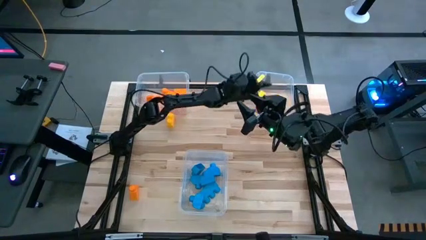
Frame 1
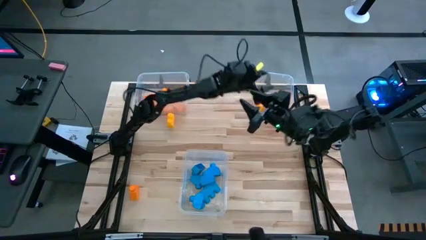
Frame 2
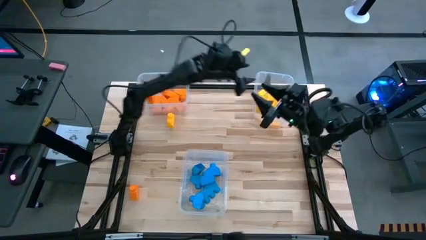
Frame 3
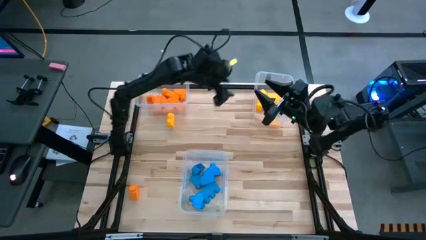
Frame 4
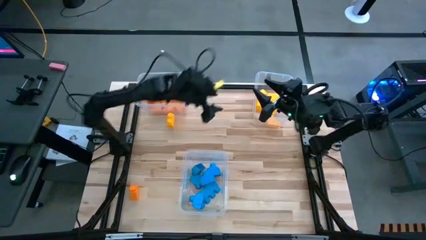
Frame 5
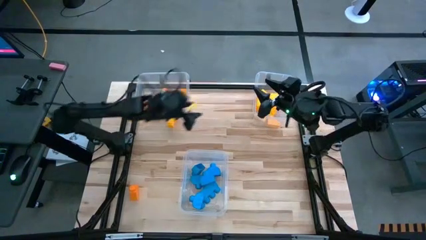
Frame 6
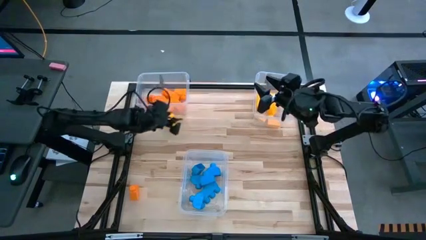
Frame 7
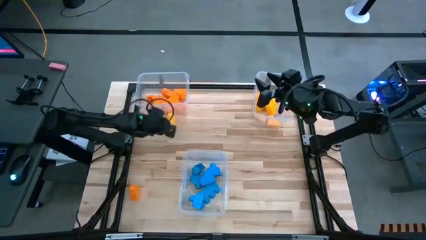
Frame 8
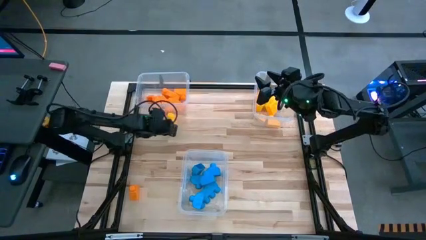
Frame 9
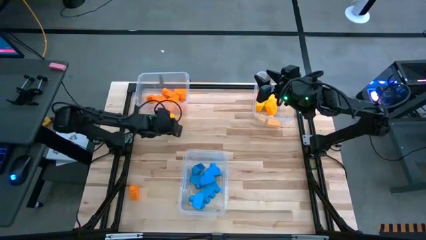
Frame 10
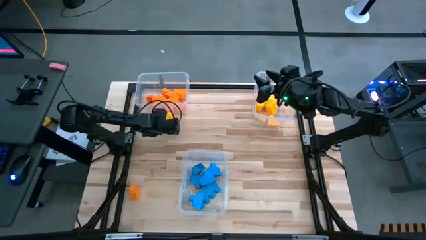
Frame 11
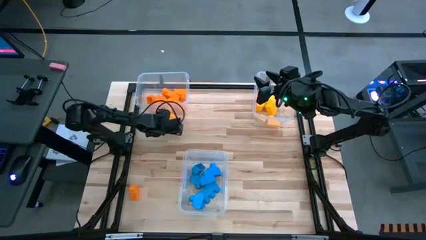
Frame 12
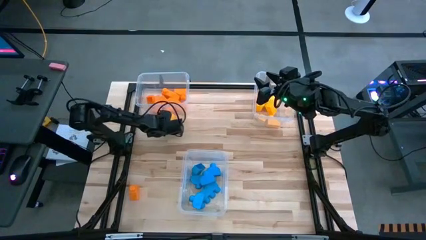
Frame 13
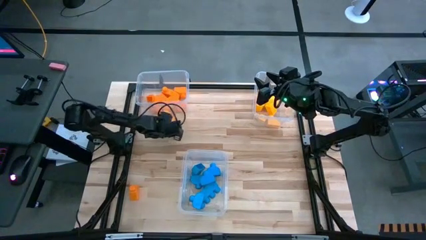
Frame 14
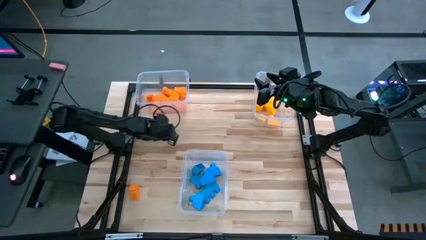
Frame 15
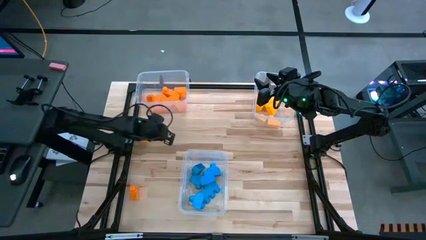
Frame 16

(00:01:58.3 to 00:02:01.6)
Task: Sort blocks
Put the yellow game piece into the top right transparent bin

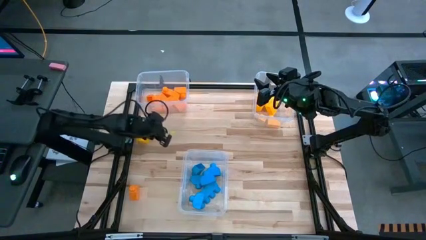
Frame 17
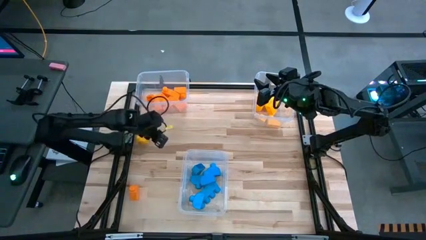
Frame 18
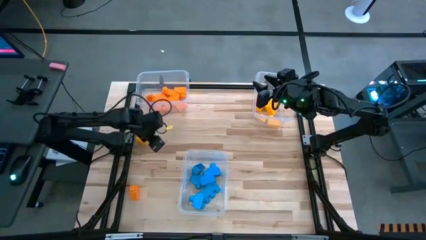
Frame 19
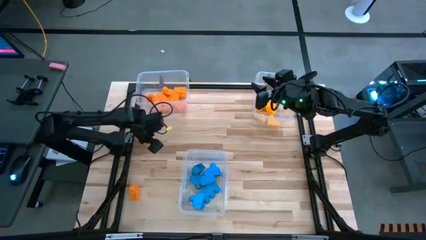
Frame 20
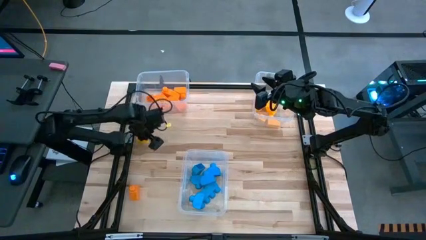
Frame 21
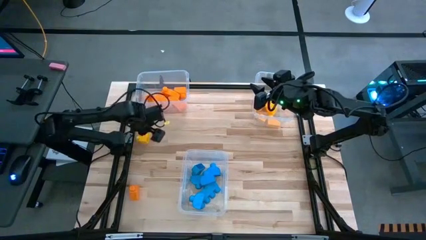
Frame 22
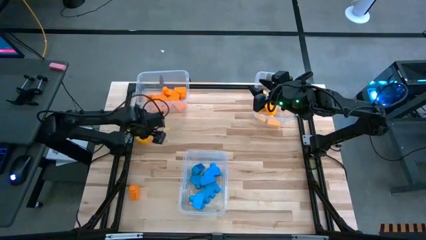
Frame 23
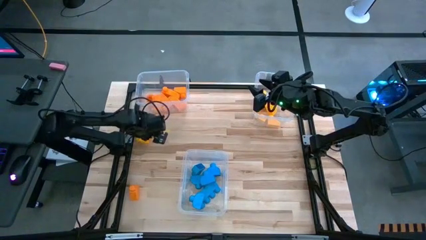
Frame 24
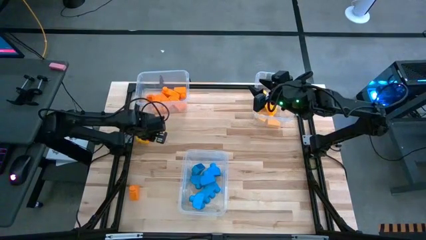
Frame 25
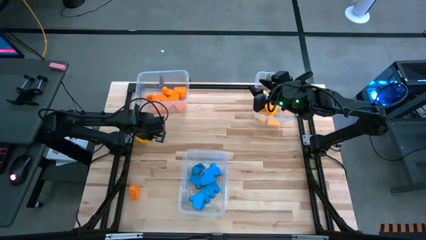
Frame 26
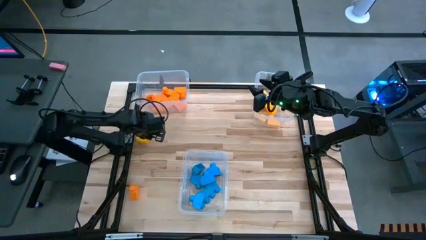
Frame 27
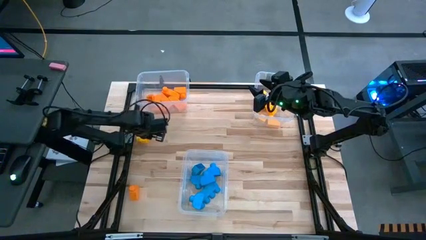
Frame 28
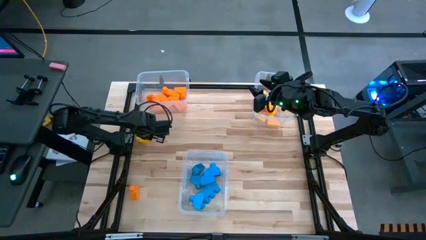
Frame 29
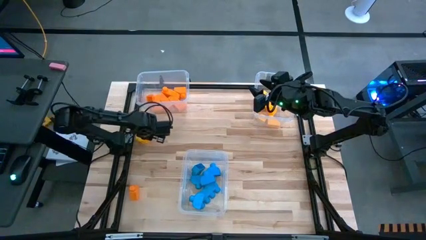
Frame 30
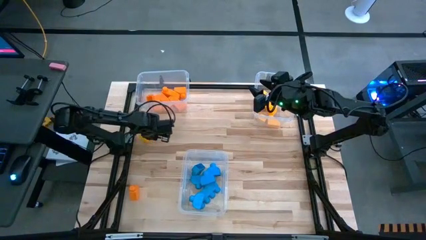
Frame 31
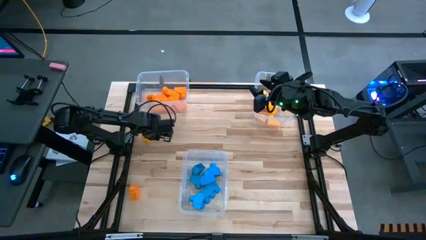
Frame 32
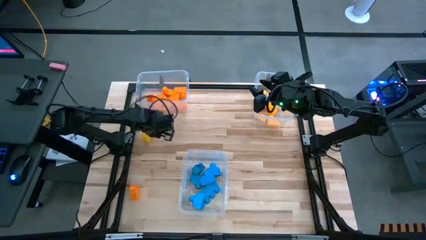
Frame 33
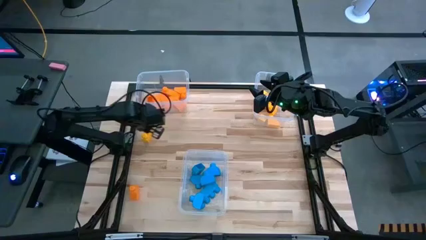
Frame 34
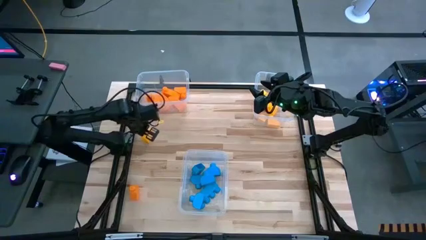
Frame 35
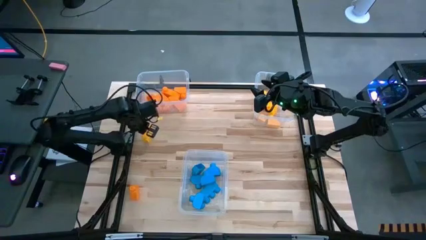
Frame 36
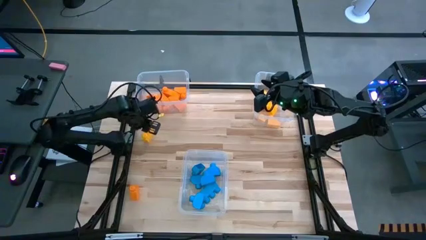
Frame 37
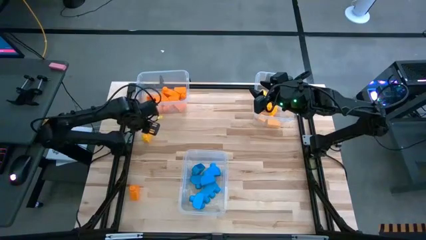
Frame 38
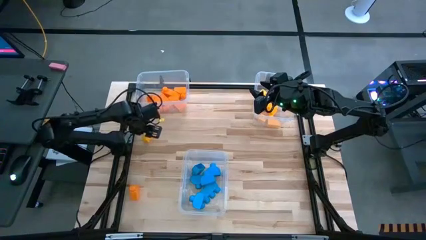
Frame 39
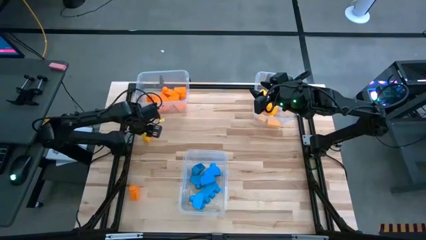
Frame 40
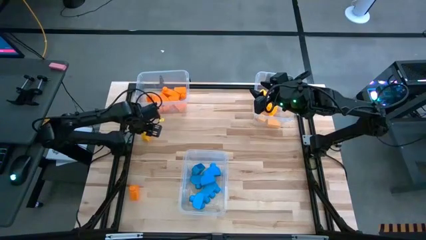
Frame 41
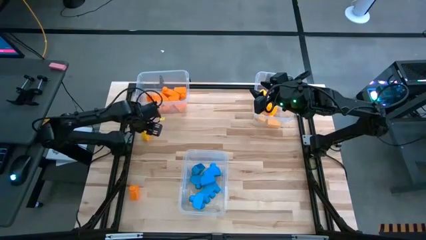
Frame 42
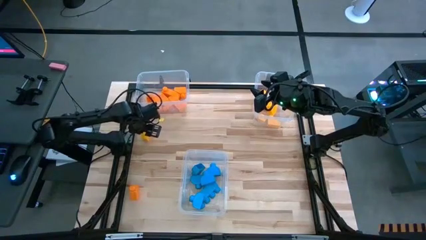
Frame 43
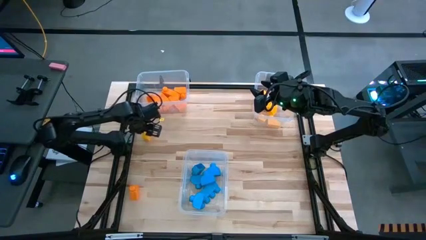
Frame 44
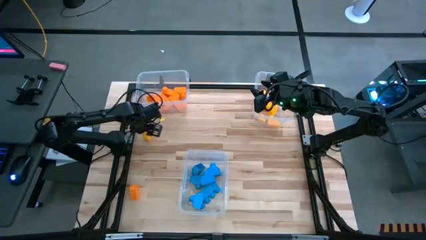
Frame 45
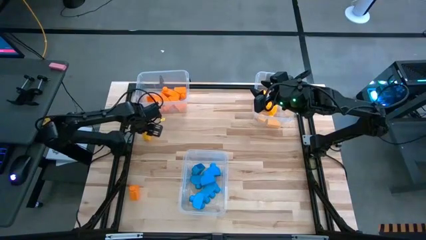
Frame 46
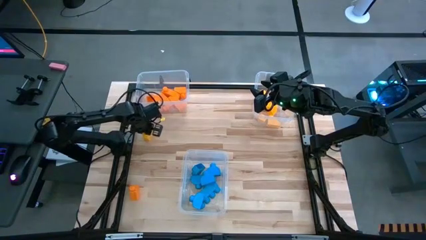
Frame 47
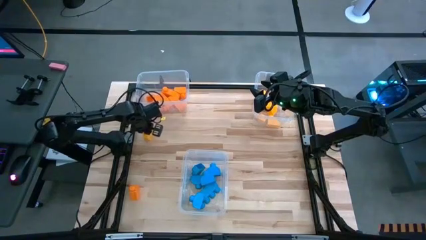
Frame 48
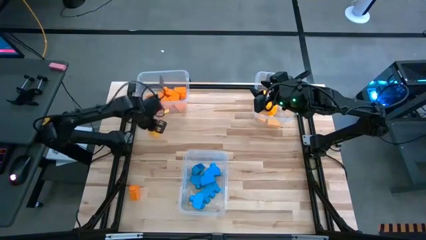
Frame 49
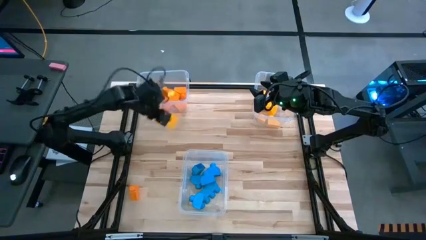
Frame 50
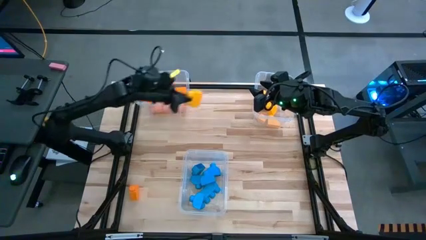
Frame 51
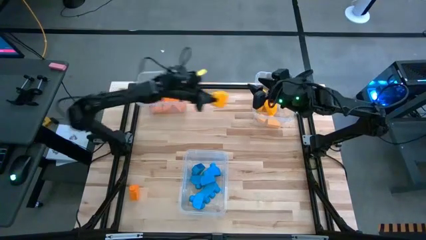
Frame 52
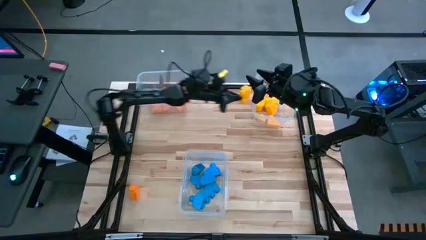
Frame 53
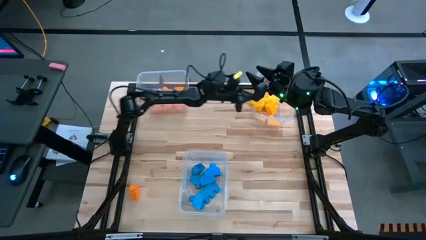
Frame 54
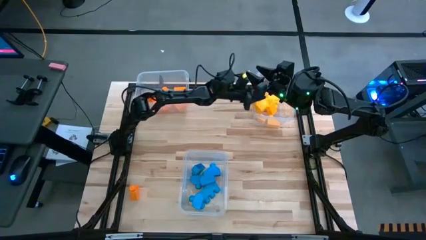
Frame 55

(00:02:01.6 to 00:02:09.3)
Put the yellow game piece into the top right transparent bin

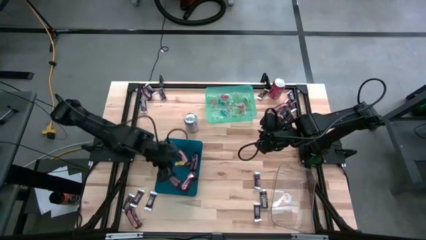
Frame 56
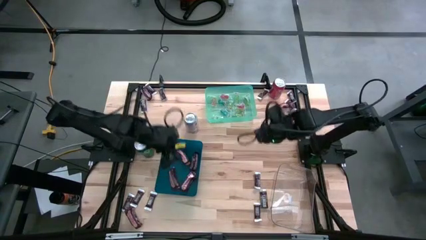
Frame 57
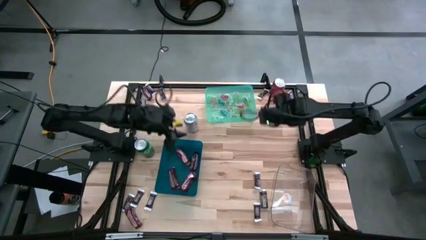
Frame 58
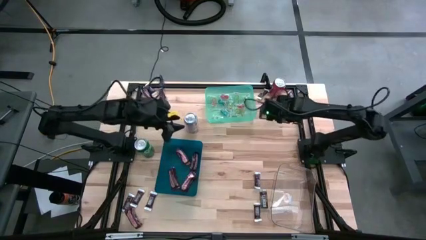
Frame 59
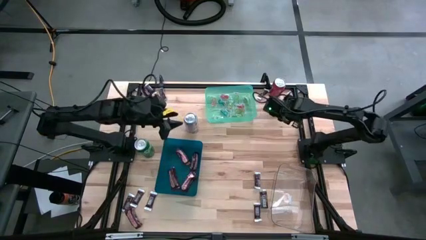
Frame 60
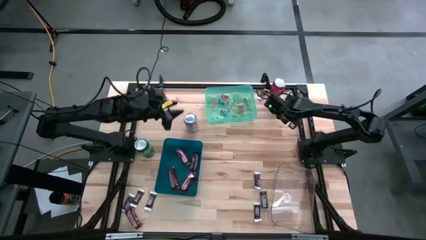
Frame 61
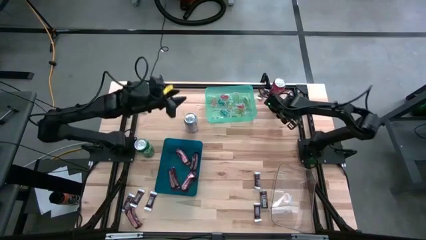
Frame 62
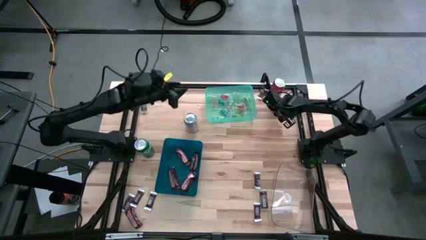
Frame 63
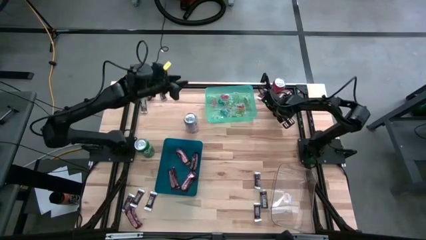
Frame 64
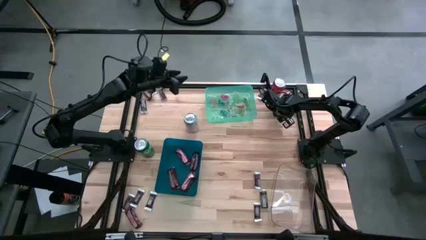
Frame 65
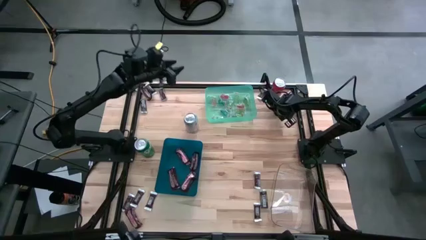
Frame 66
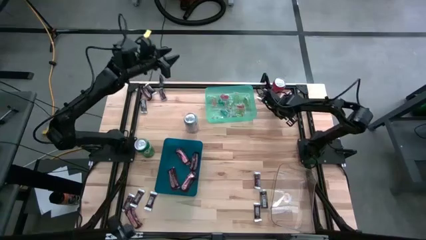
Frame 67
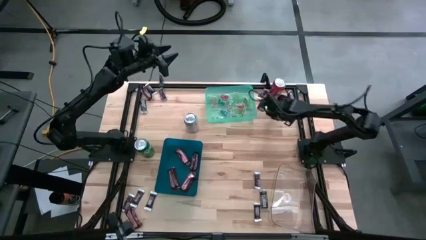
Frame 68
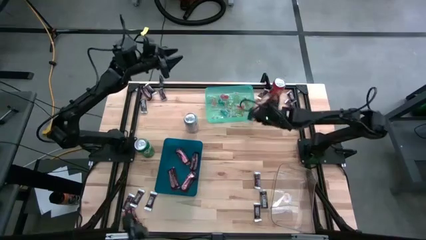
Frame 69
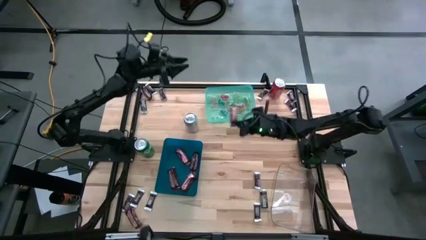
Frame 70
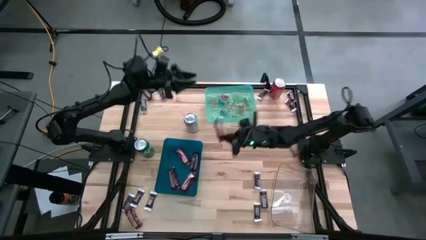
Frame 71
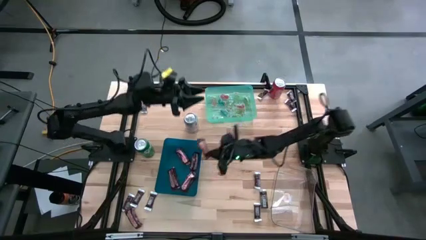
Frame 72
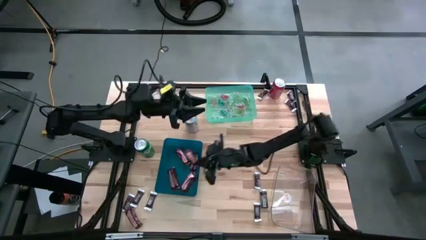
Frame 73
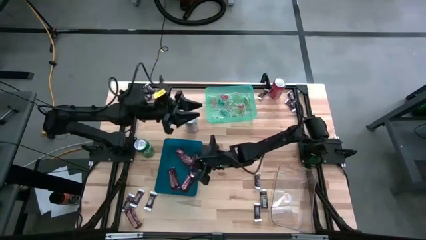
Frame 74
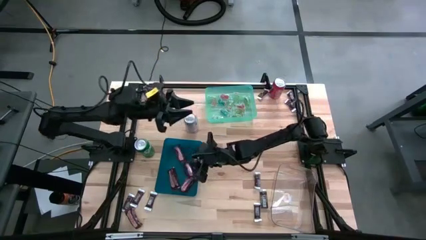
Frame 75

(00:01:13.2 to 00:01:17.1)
Task: Organize candy in baskets
Put the brown chocolate into the blue bin

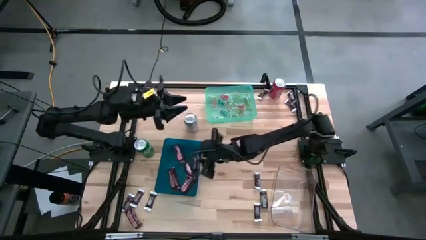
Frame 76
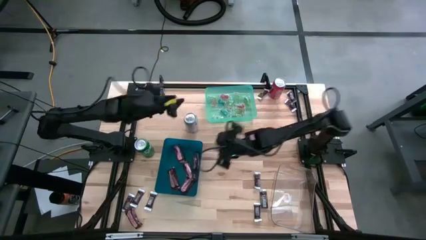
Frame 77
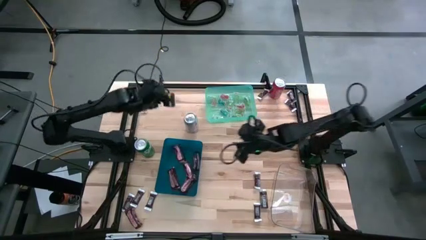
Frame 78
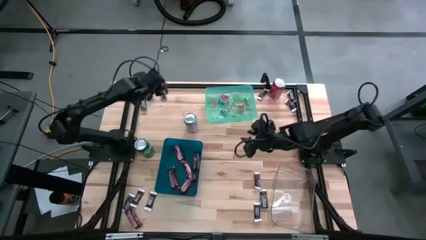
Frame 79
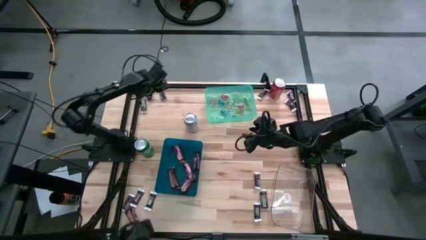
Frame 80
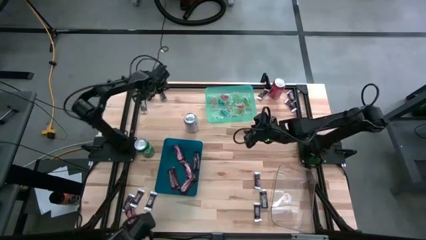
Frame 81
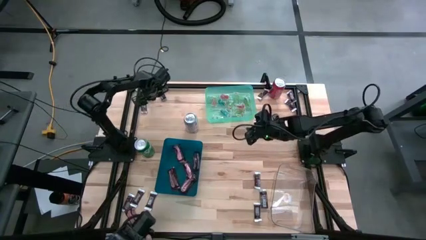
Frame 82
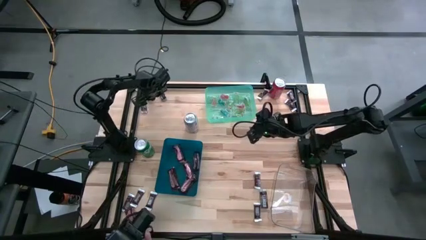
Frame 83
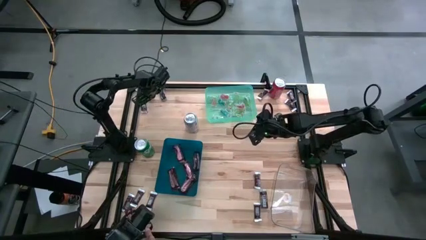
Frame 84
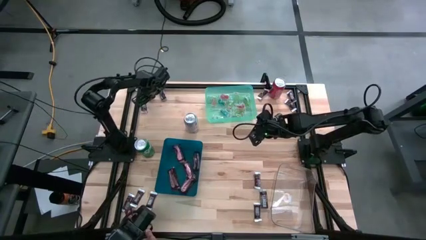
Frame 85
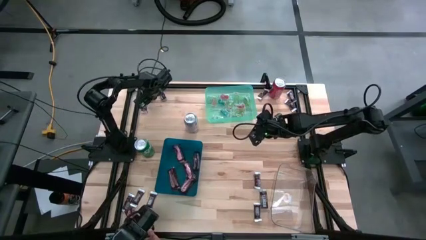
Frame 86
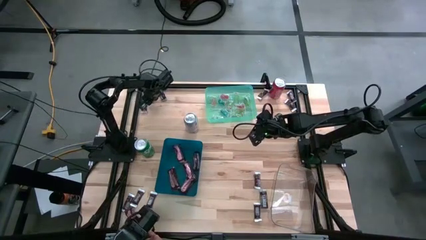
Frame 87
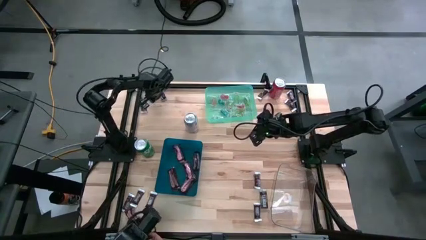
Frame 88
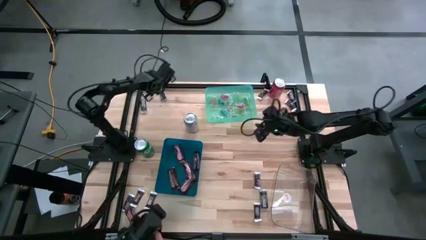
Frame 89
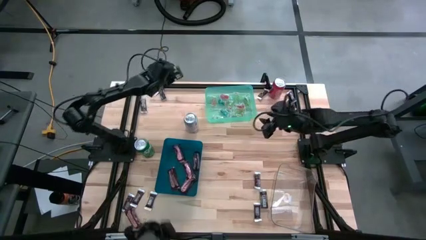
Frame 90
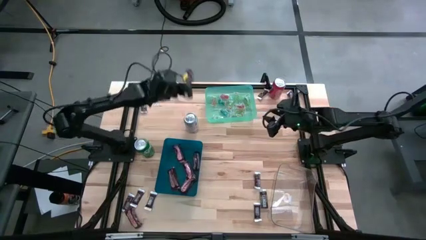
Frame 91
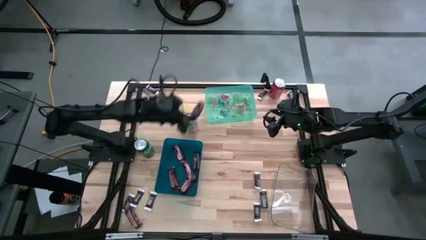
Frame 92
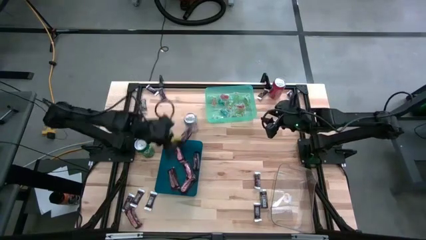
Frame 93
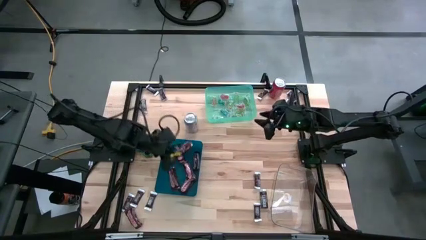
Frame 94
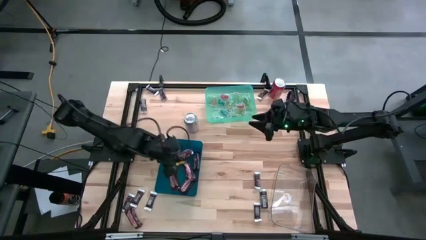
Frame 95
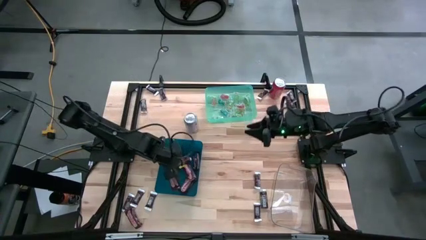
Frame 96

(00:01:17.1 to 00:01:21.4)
Put the brown chocolate into the blue bin
